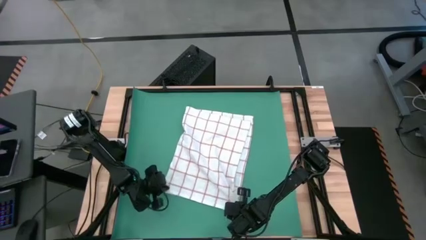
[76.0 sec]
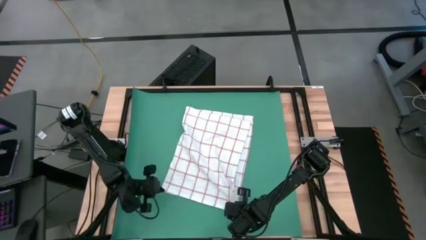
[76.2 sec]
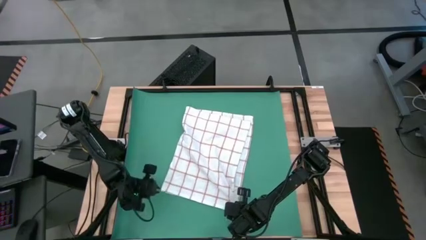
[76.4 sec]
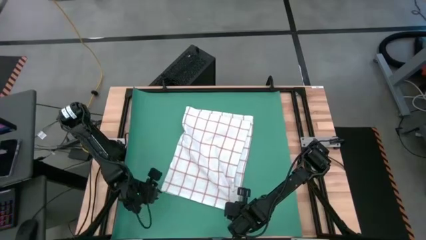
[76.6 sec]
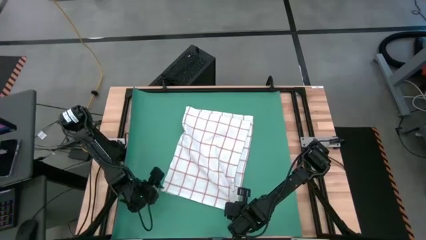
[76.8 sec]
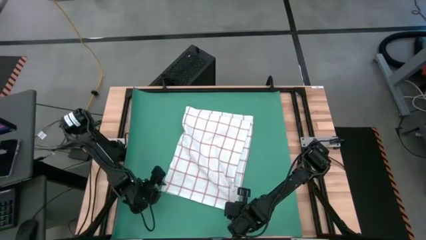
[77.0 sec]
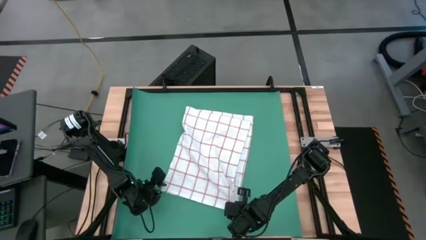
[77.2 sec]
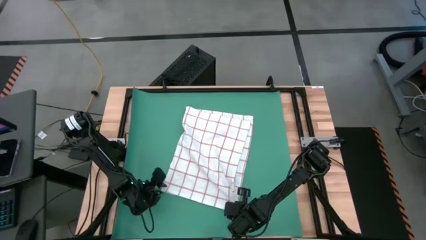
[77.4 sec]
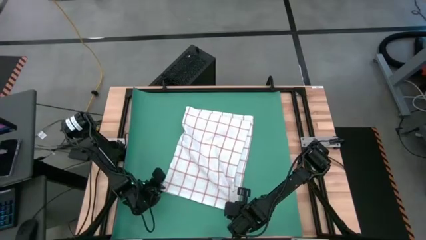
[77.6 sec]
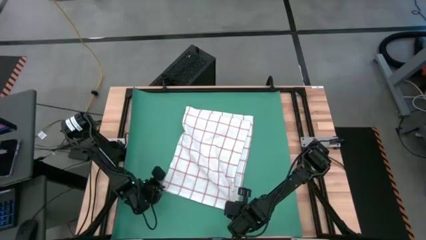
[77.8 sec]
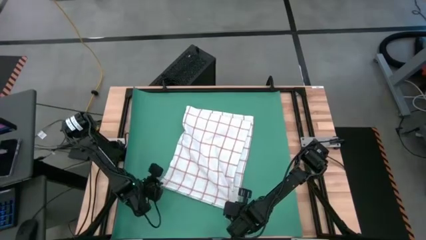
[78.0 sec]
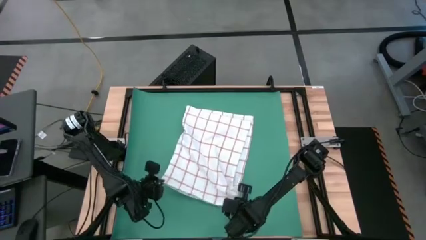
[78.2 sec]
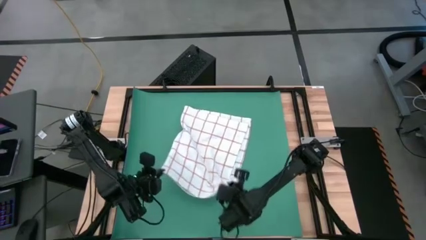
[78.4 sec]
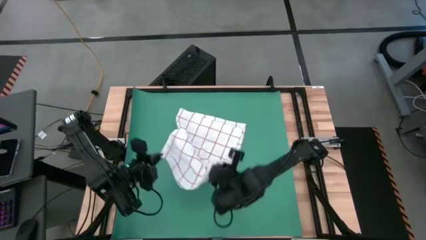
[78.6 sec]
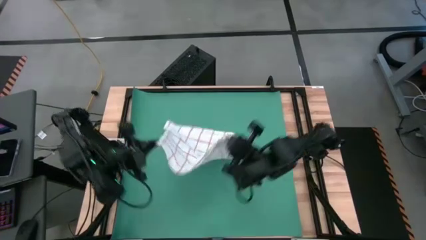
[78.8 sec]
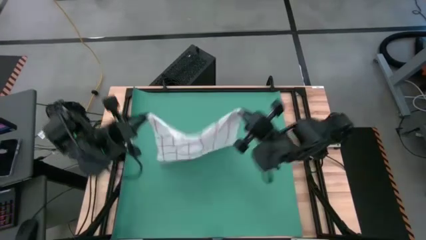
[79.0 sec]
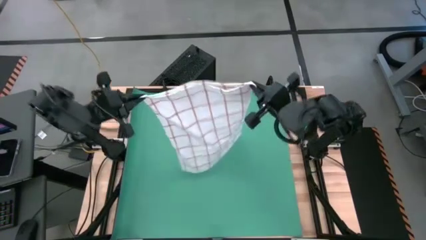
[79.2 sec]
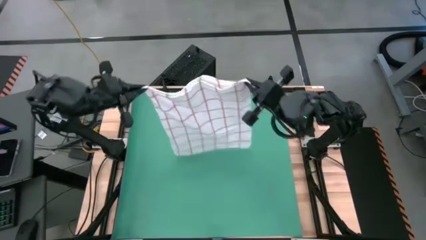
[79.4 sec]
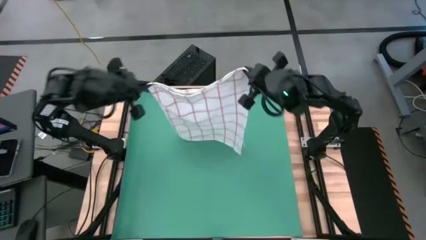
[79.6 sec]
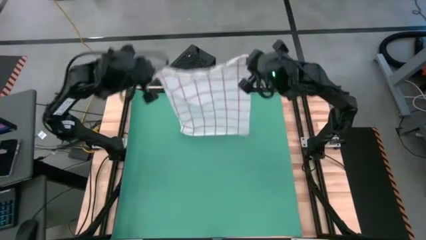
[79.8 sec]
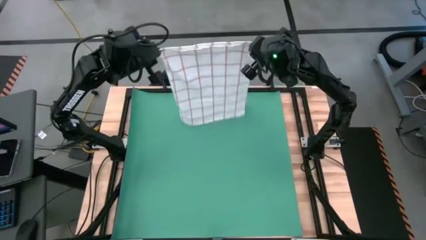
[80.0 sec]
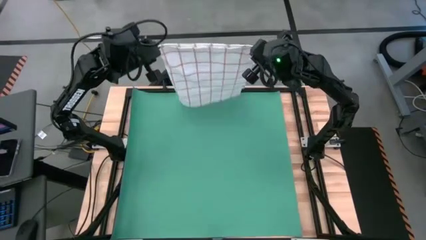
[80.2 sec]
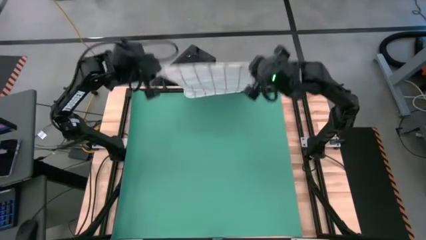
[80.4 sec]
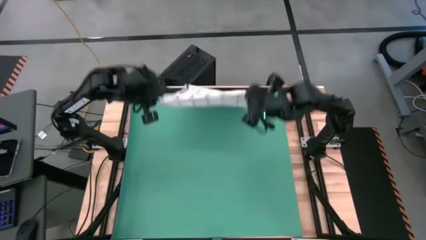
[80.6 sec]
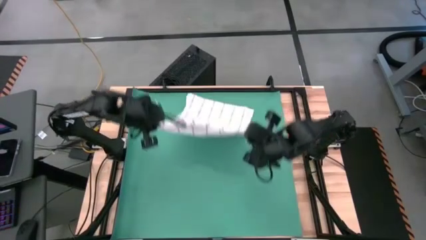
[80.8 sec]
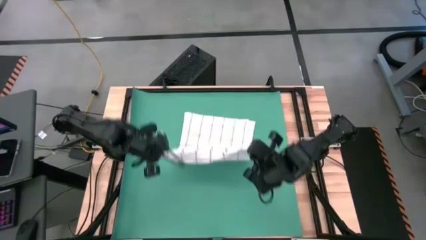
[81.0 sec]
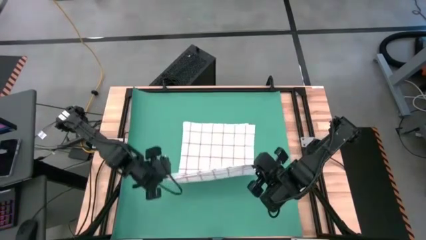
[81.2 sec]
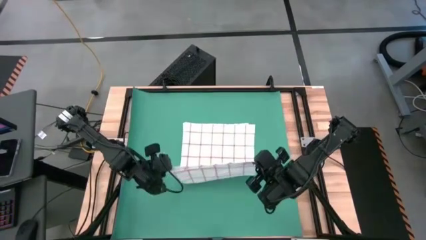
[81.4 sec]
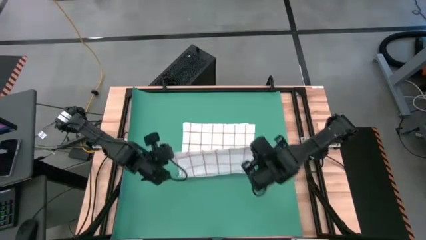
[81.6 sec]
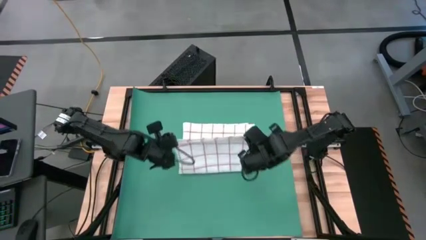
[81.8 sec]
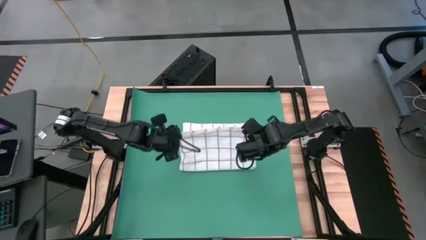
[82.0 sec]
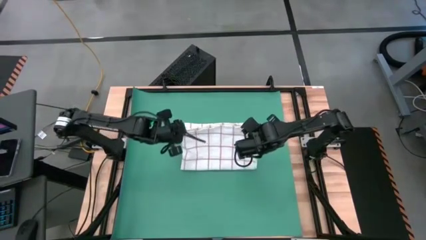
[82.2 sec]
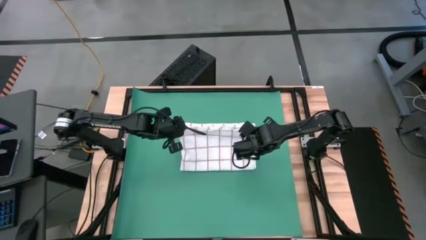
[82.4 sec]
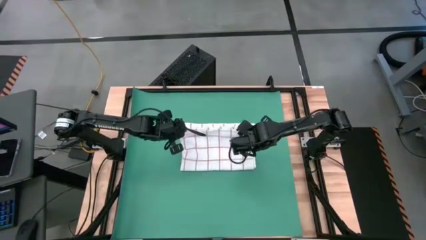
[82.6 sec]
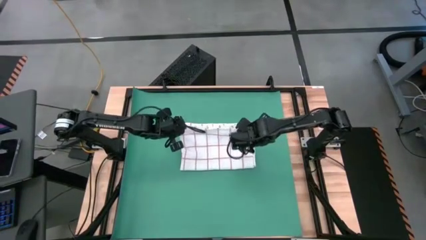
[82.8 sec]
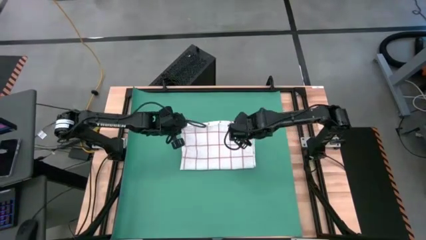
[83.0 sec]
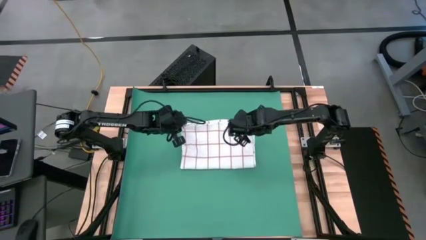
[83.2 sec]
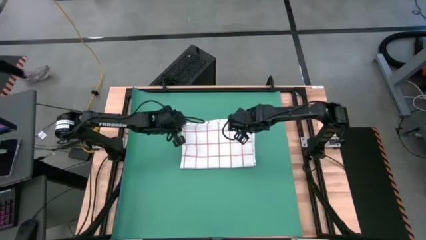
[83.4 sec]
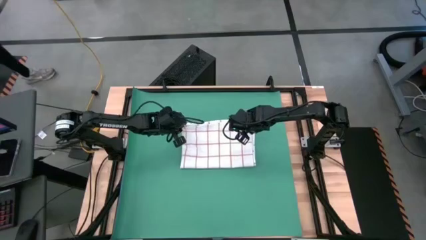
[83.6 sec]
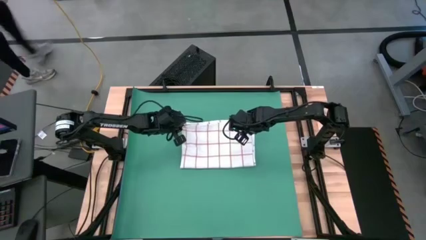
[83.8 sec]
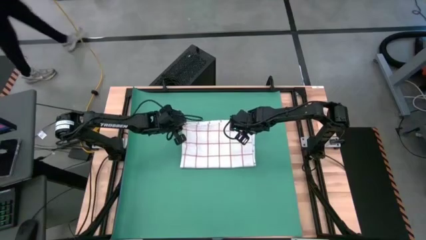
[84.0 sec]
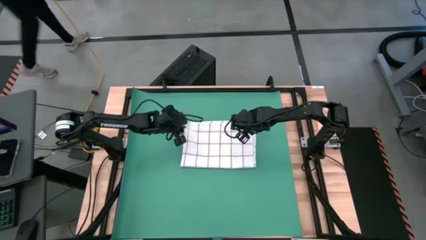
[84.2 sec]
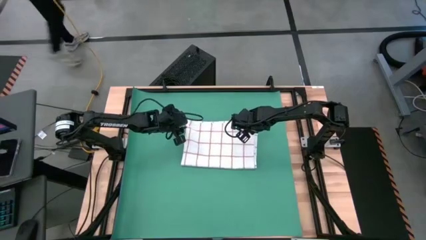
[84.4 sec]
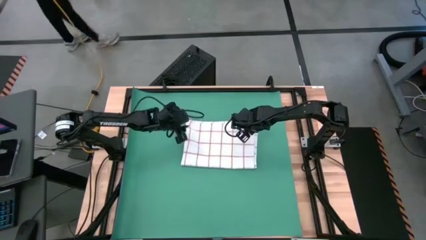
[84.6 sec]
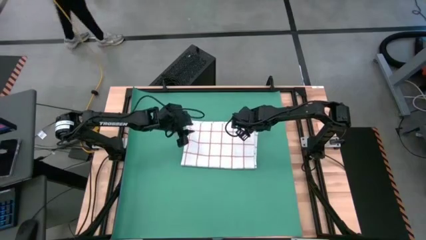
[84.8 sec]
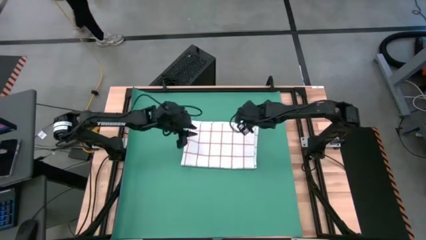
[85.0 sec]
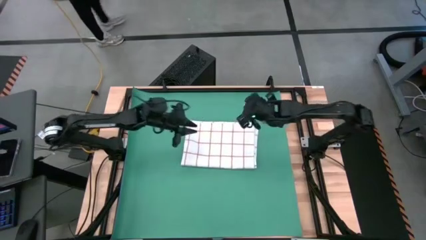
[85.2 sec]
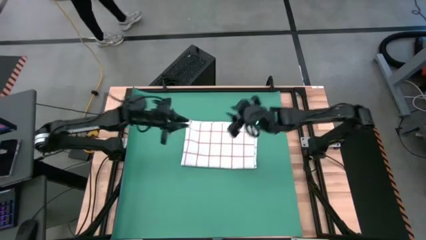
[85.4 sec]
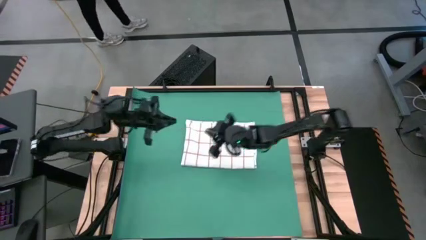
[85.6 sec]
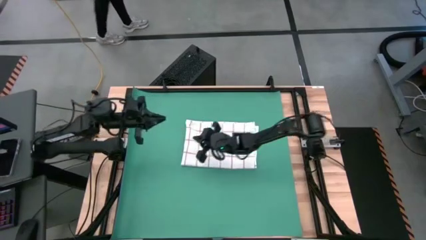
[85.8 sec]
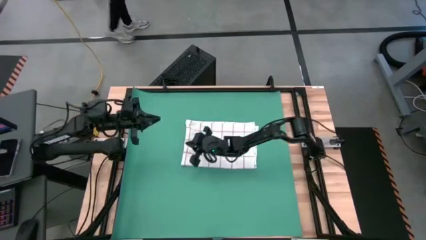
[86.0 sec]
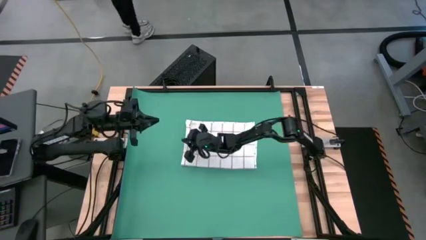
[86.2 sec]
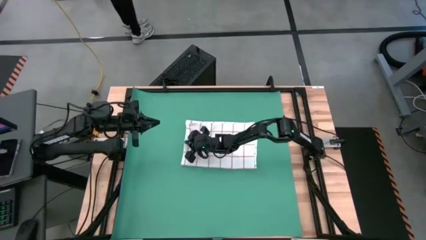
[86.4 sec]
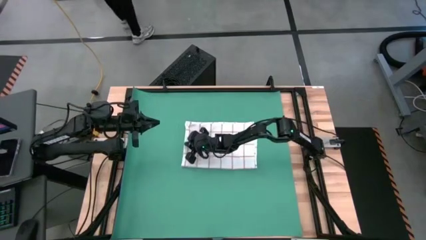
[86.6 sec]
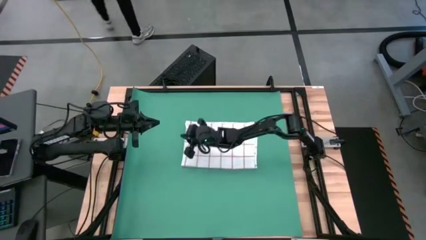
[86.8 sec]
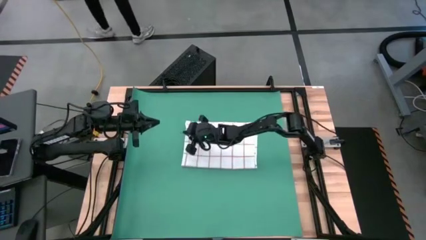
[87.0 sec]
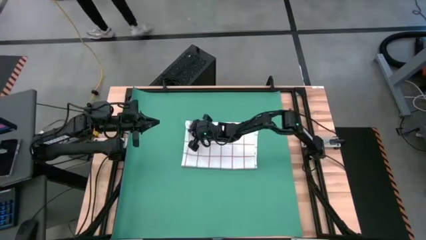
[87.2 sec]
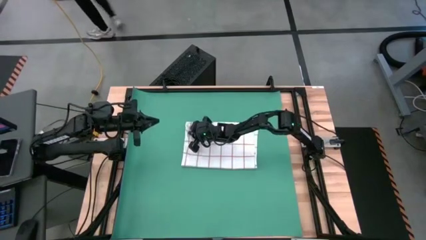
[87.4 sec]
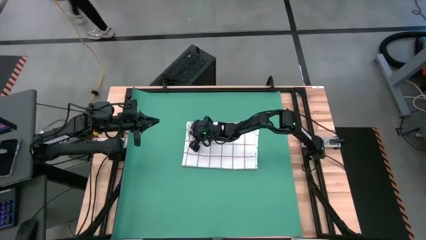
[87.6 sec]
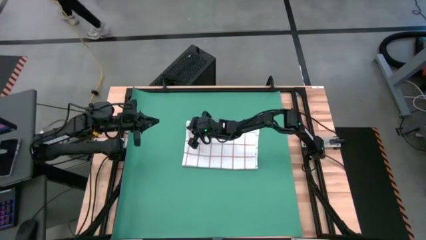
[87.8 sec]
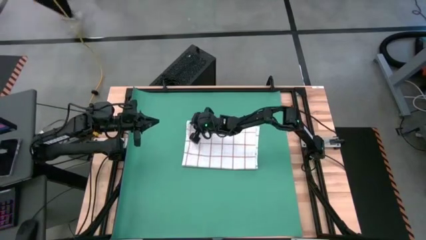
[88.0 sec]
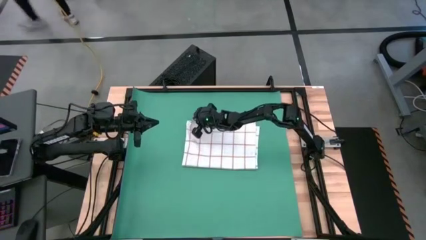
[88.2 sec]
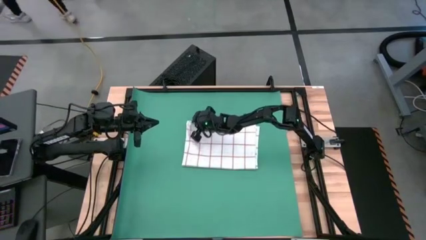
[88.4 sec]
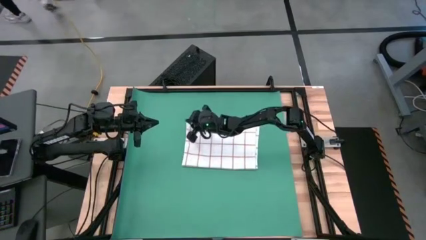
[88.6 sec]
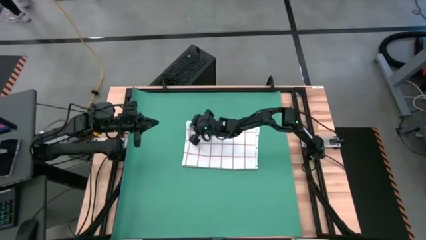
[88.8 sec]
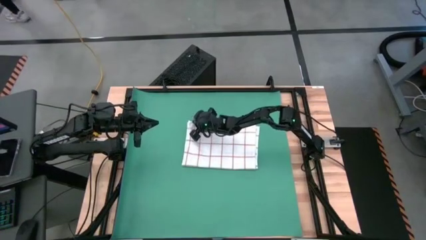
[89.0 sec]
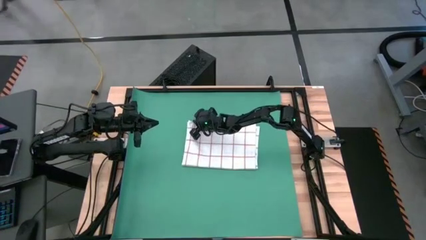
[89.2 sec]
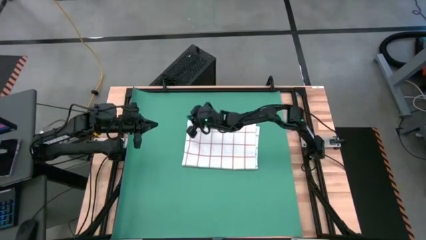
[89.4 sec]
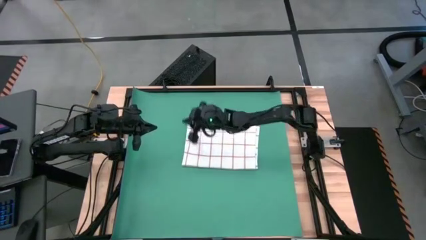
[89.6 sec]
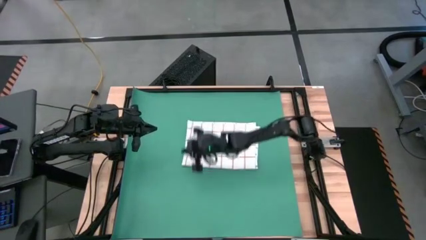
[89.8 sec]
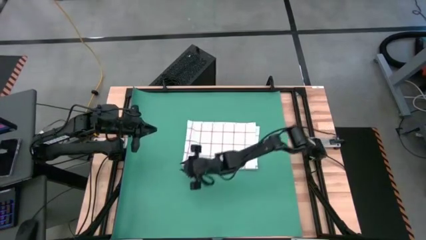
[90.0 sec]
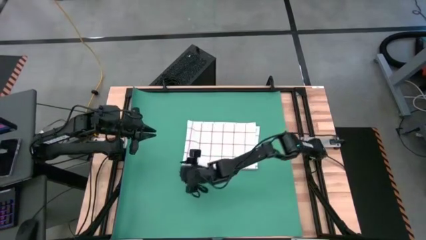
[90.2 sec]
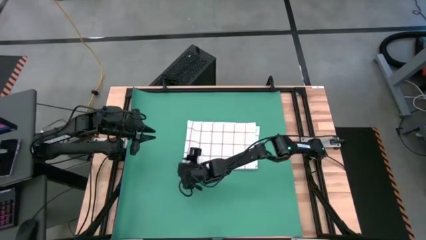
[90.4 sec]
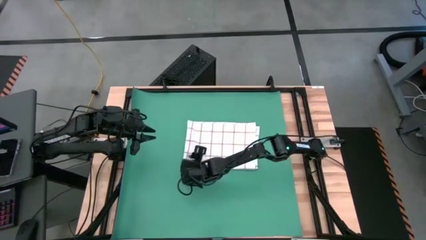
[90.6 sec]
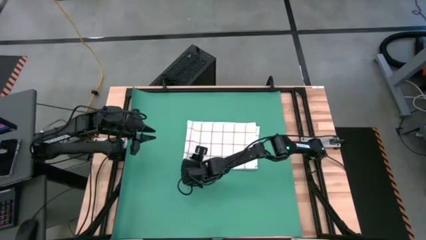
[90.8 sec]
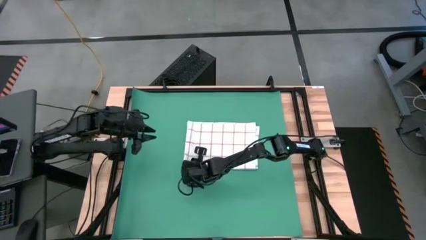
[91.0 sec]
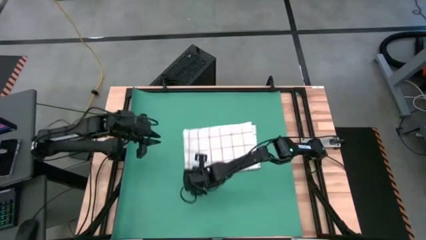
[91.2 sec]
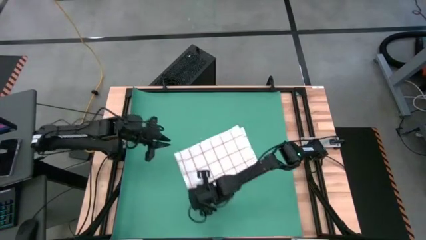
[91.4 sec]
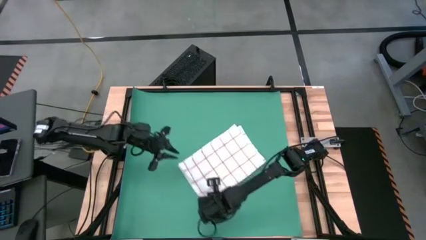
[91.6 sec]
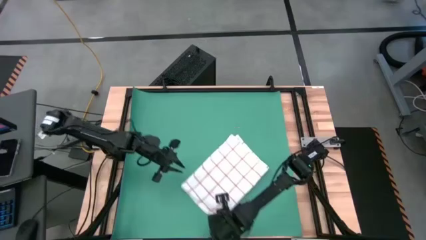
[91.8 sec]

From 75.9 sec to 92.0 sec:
Task: Roll towel
Roll the white stripe towel
